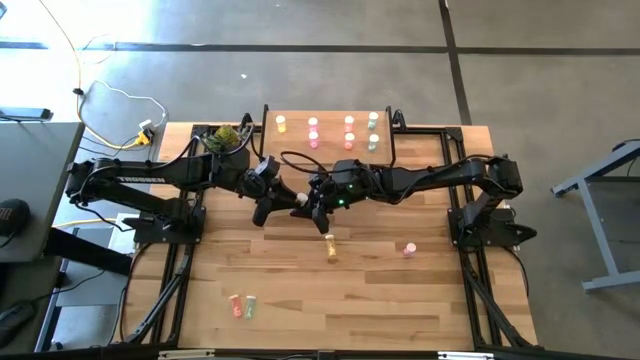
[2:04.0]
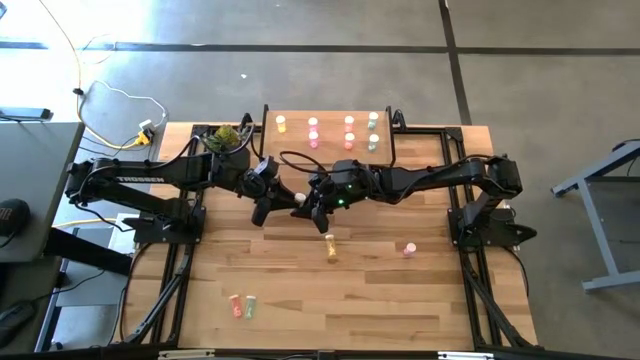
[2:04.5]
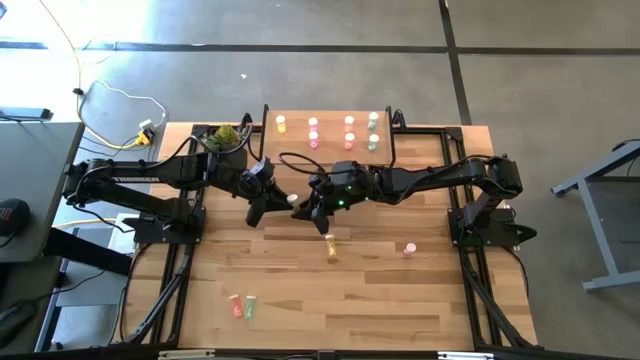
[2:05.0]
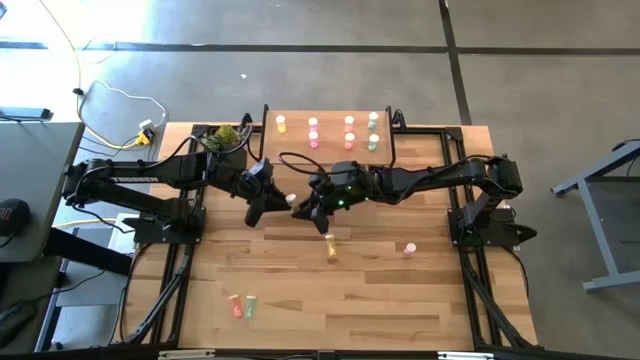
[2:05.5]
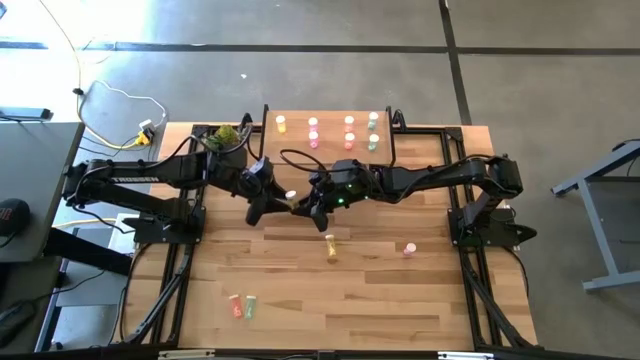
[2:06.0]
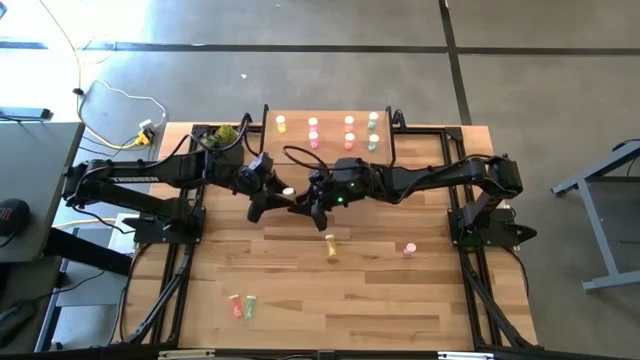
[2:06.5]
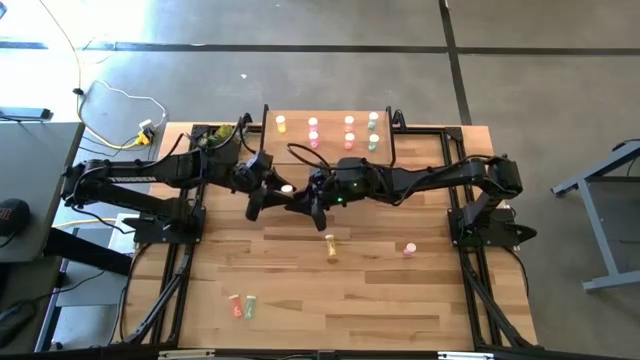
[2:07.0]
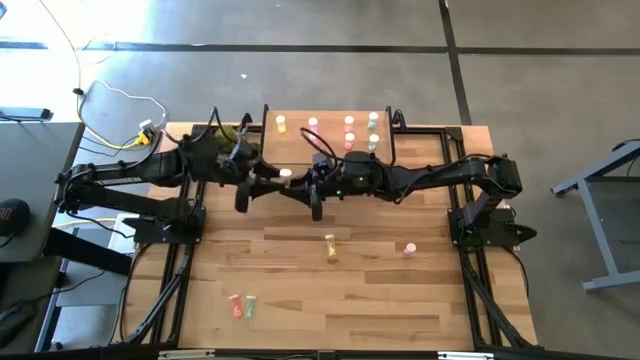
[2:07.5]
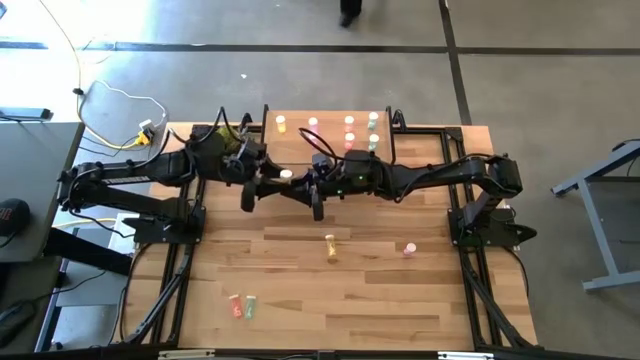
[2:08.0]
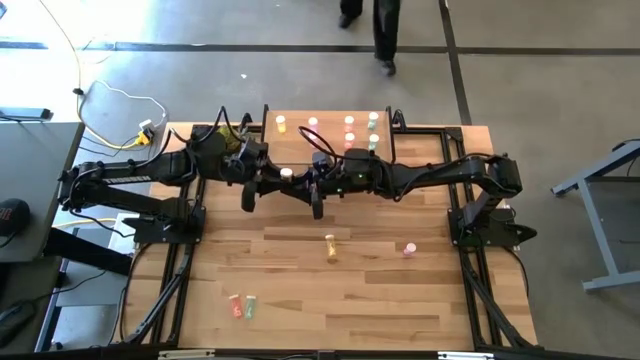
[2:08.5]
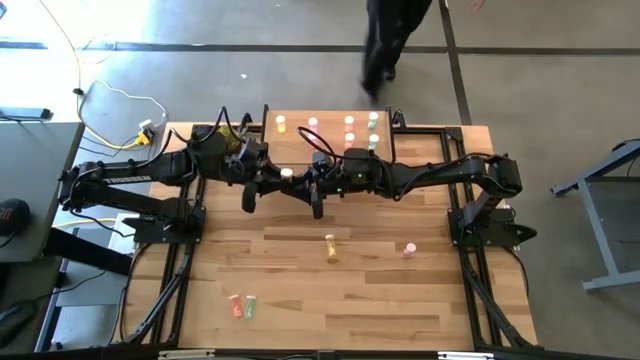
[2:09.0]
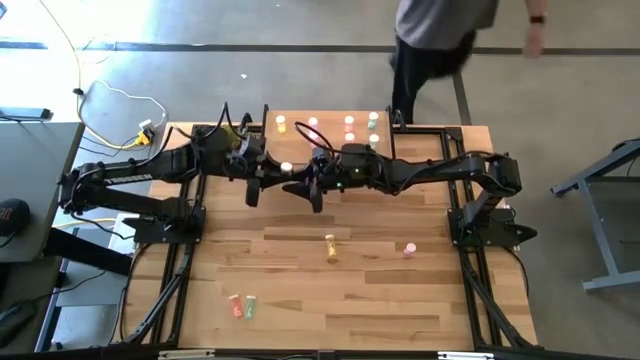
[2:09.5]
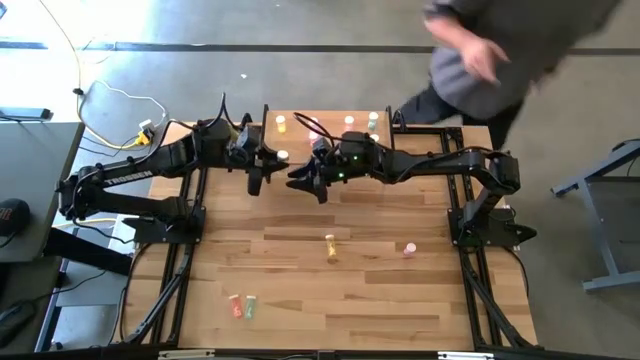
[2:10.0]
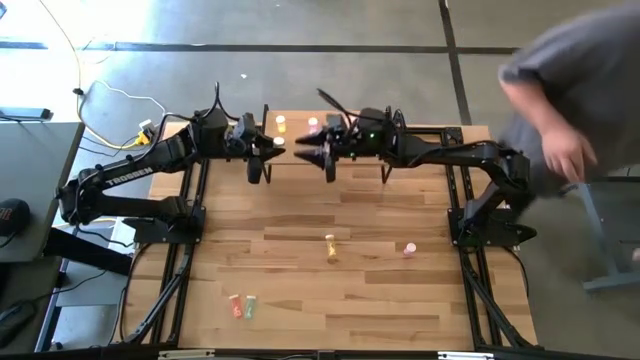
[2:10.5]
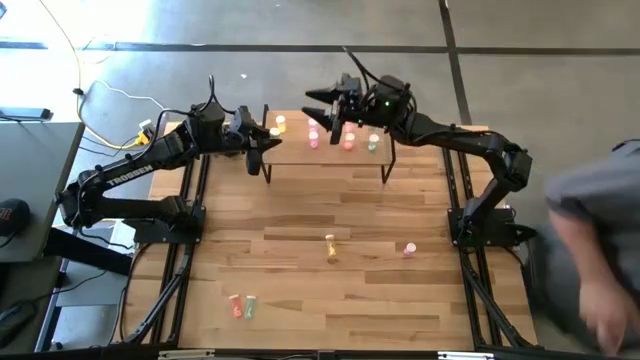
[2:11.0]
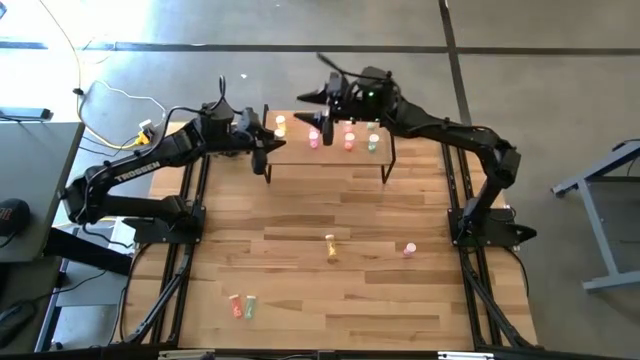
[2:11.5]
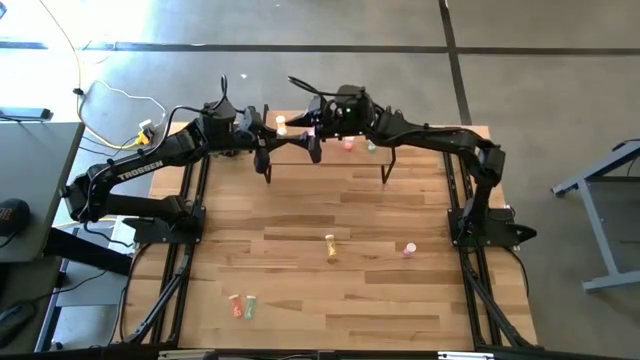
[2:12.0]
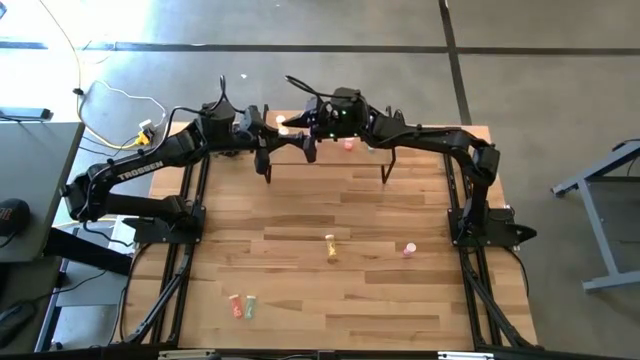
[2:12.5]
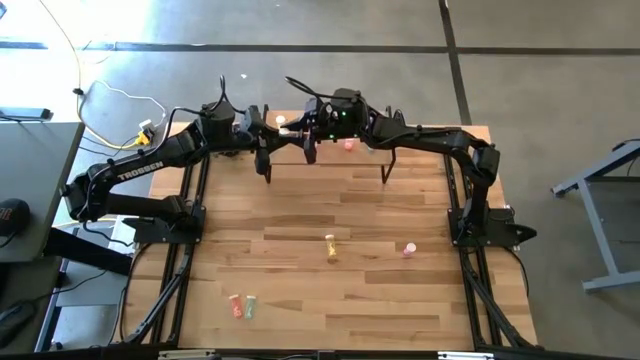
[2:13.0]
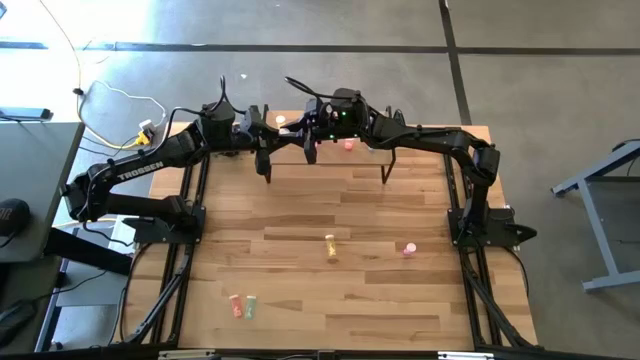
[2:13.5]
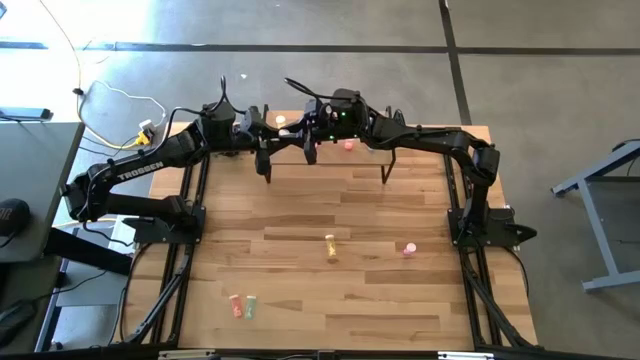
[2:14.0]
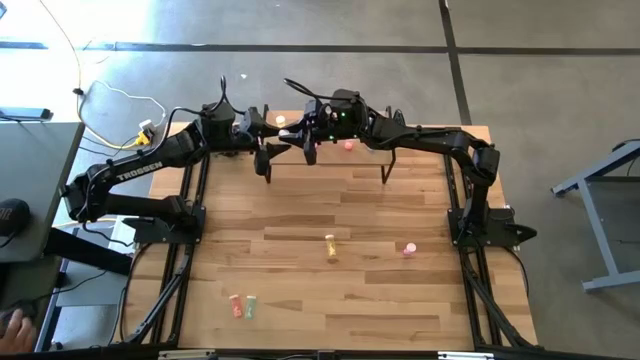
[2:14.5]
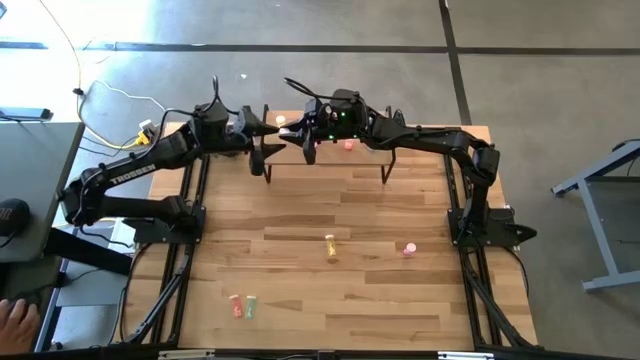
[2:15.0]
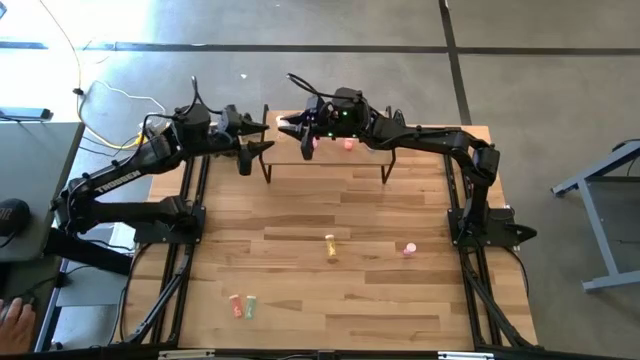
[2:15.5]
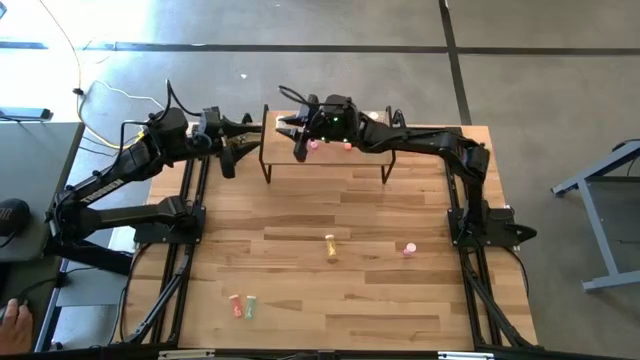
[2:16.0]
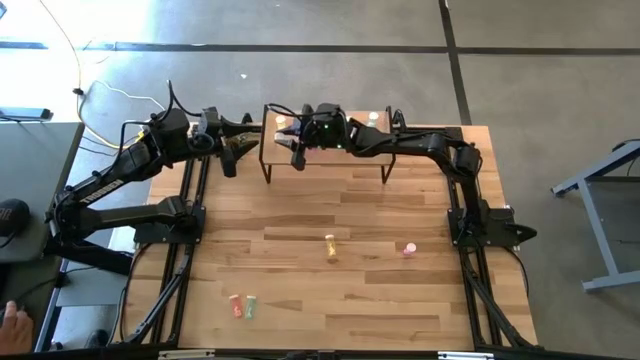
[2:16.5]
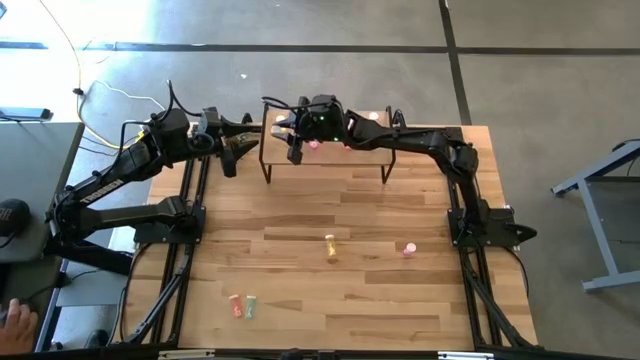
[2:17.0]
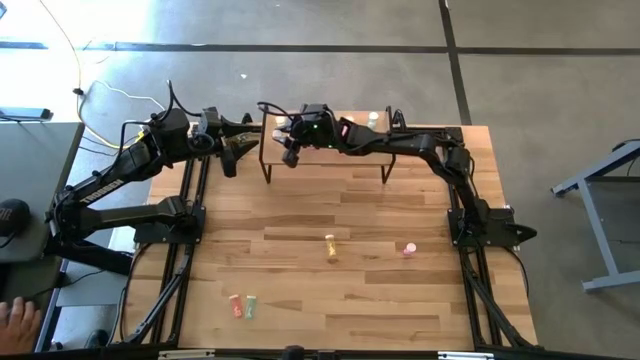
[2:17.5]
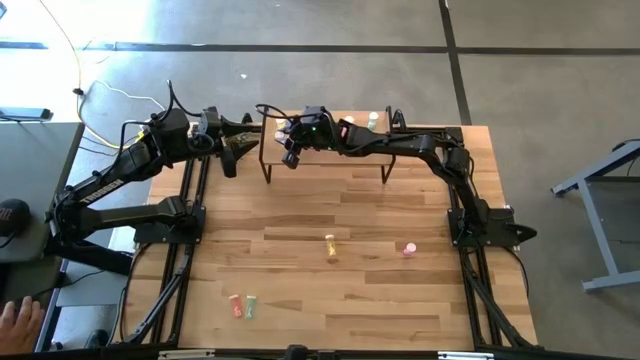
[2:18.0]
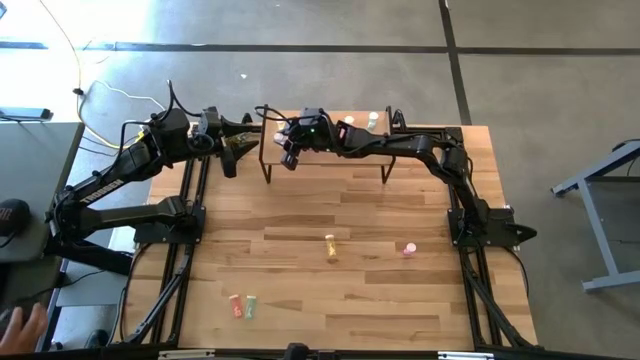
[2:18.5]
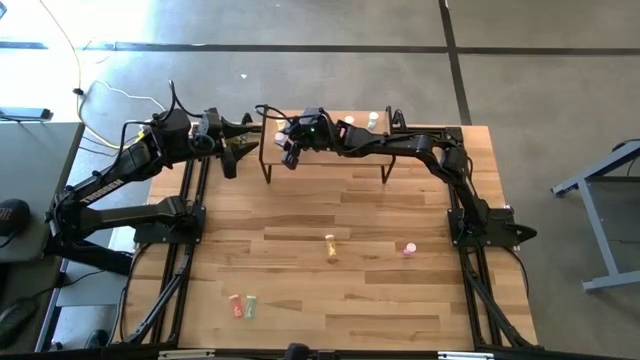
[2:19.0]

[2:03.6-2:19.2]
Task: Pick and place medicine bottles onto shelf by color
Put the bottom yellow pill bottle on the shelf

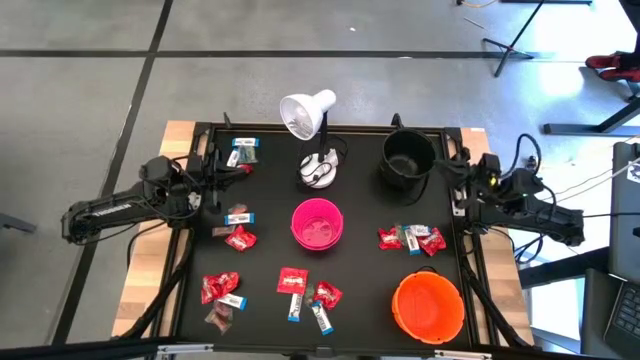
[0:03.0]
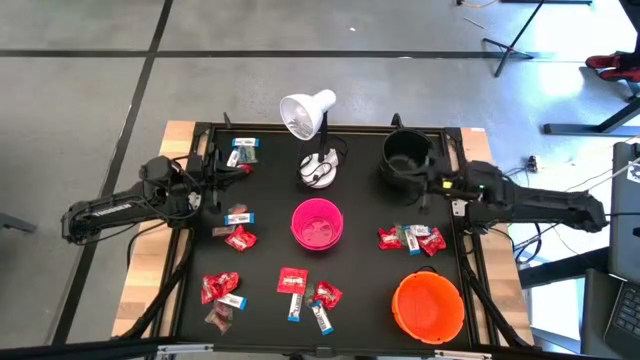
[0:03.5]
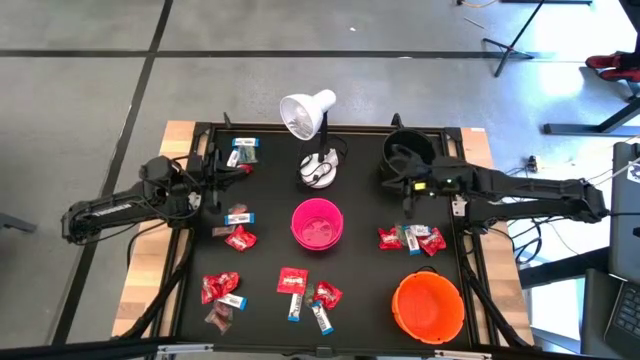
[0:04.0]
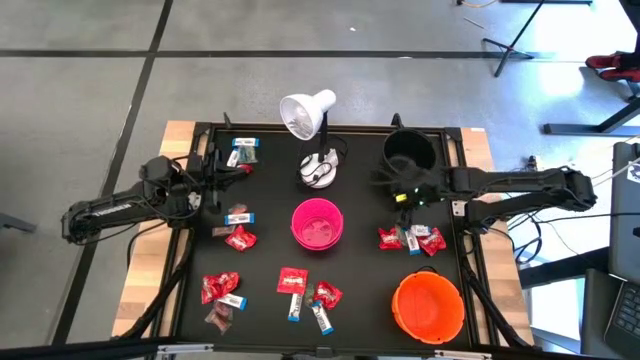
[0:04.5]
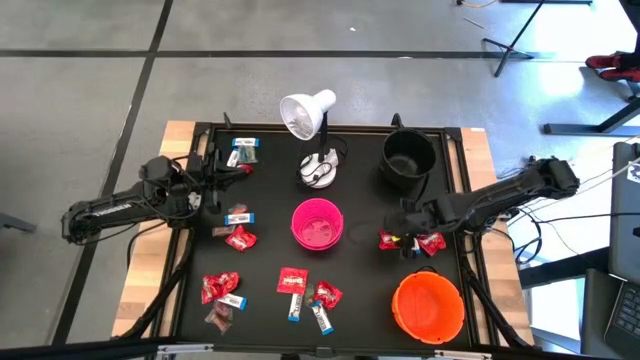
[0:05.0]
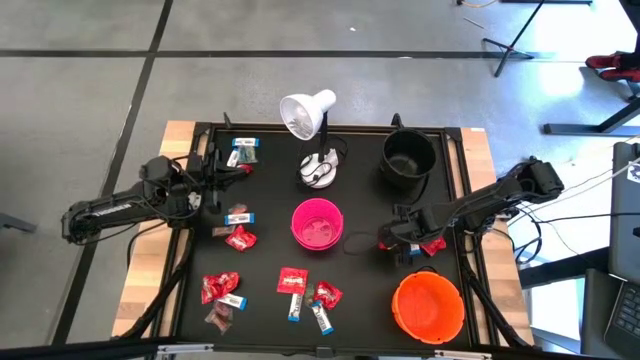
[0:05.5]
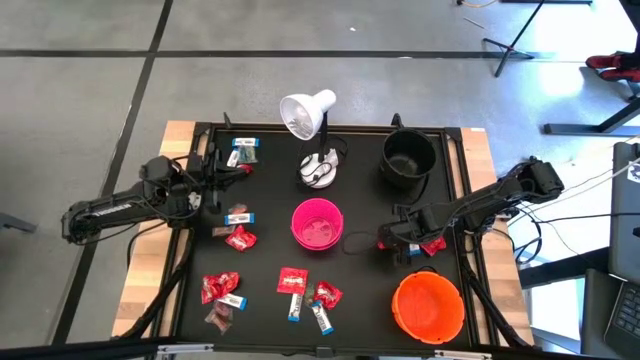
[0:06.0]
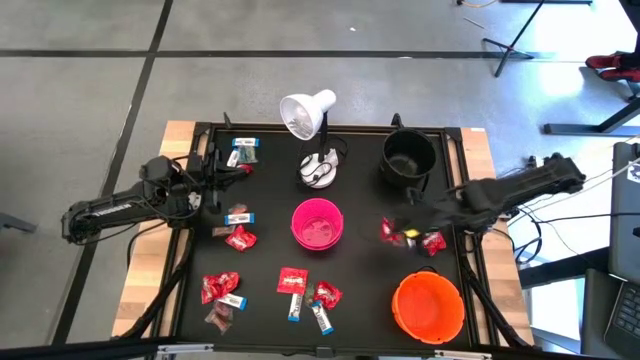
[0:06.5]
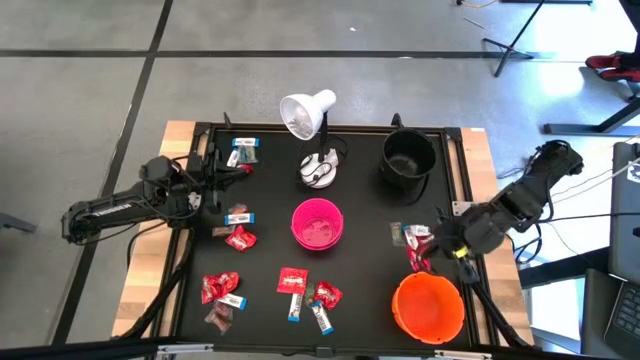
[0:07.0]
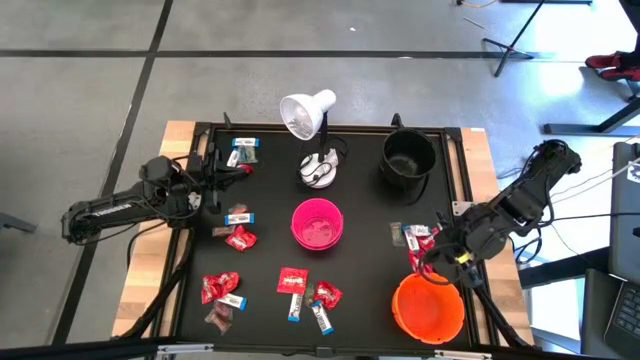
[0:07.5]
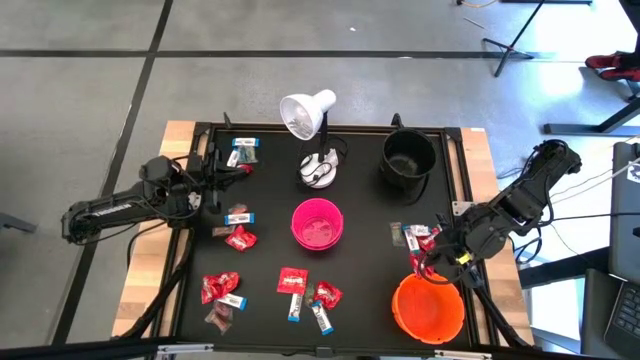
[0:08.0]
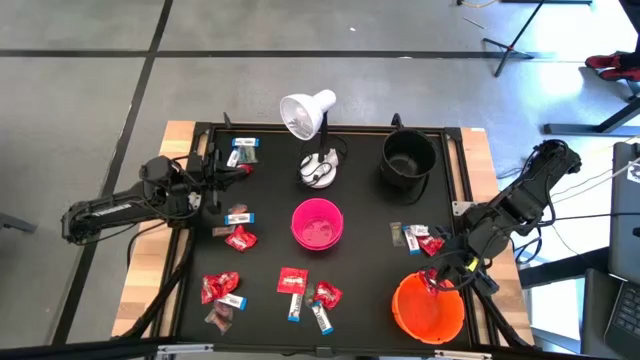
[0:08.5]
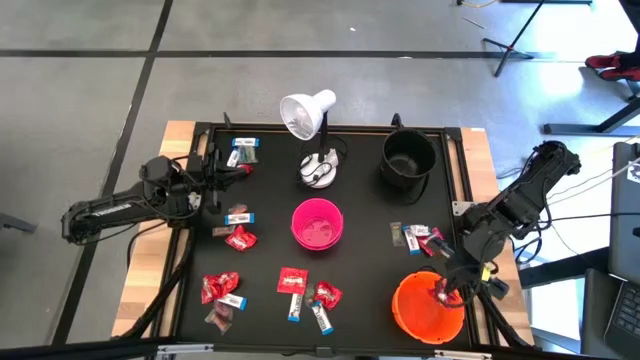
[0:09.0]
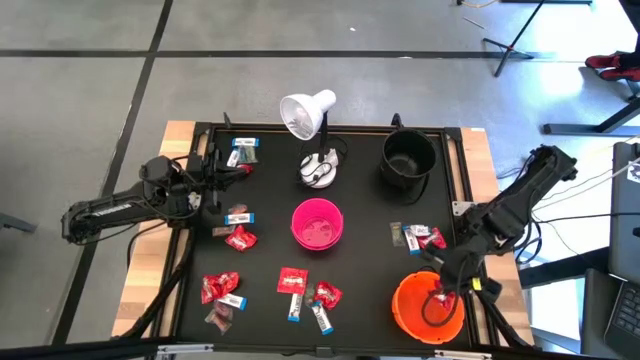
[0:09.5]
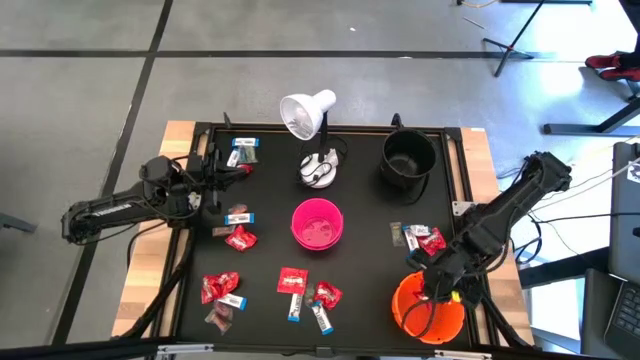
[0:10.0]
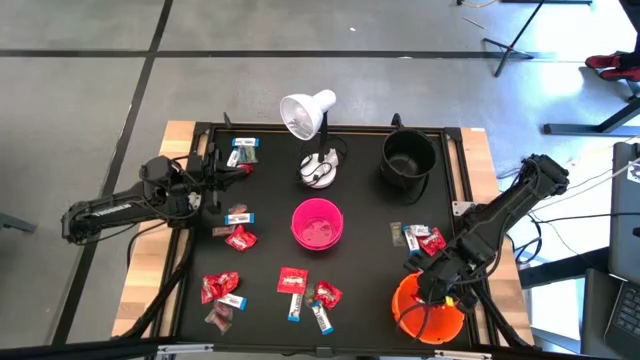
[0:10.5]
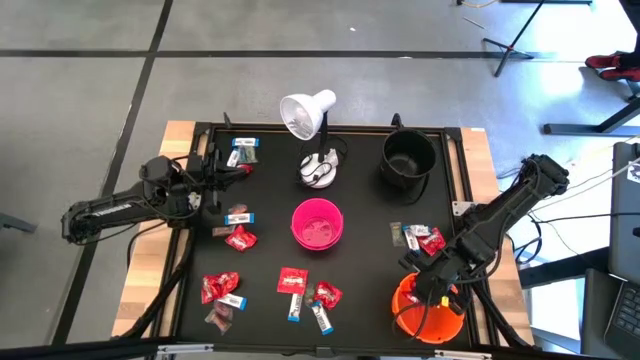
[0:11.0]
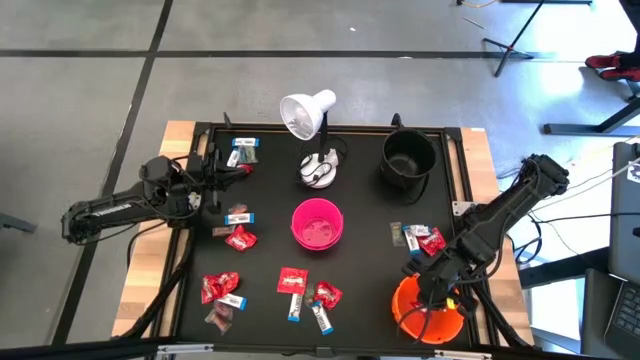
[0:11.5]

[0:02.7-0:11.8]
Task: Sort candy
Put the red candy into the orange bucket
